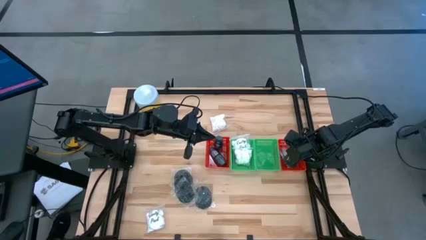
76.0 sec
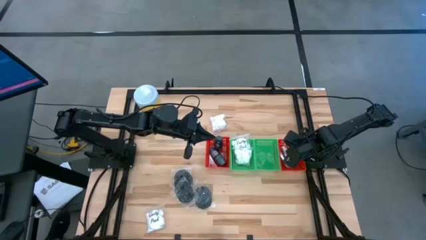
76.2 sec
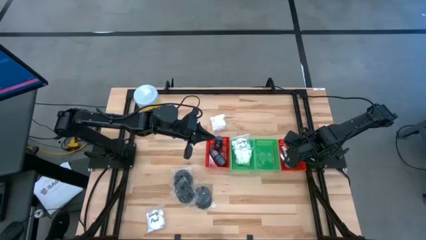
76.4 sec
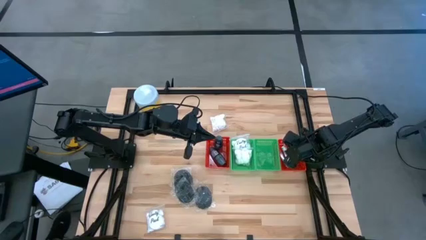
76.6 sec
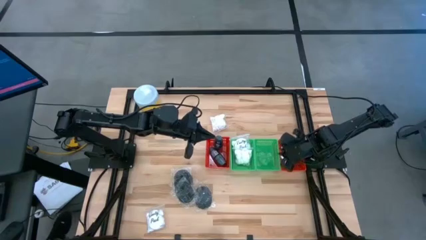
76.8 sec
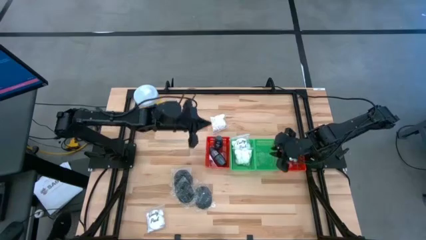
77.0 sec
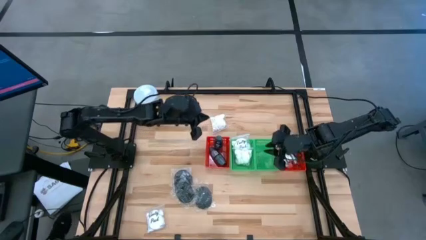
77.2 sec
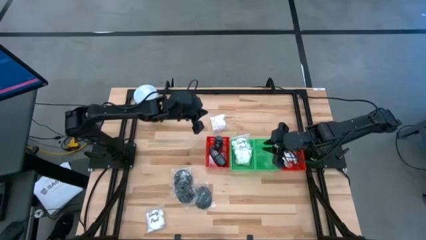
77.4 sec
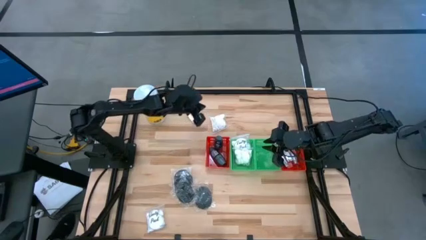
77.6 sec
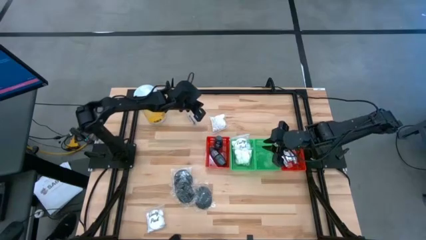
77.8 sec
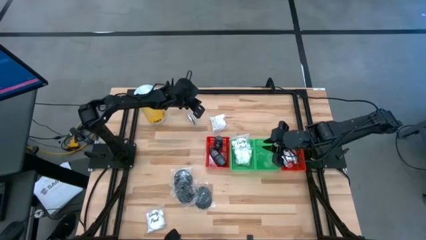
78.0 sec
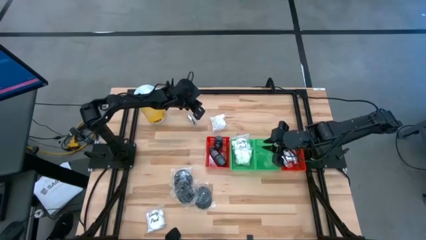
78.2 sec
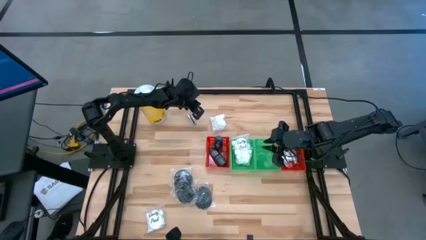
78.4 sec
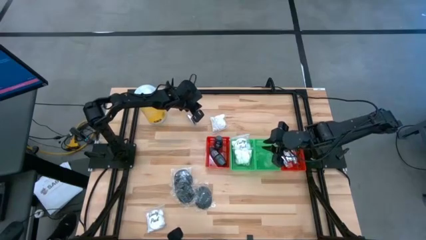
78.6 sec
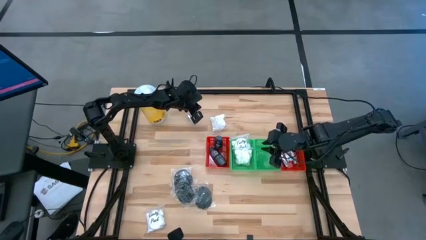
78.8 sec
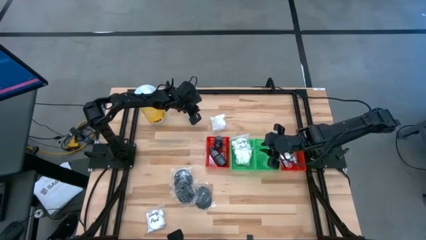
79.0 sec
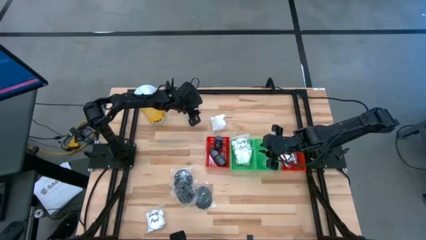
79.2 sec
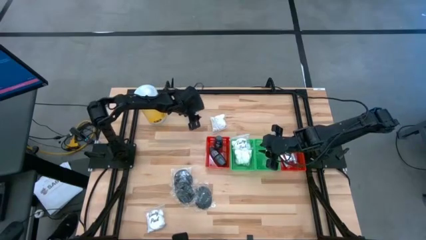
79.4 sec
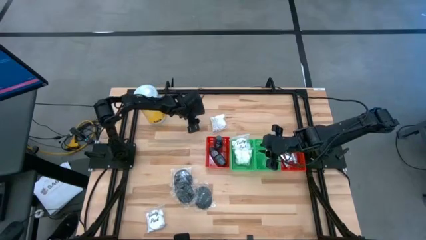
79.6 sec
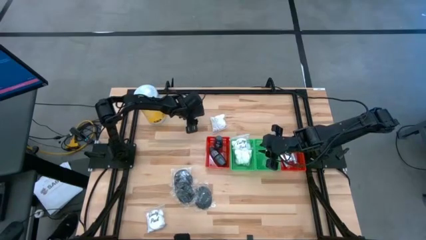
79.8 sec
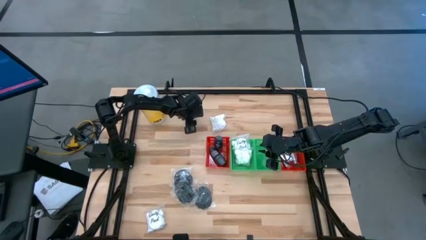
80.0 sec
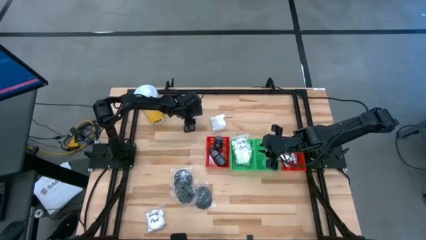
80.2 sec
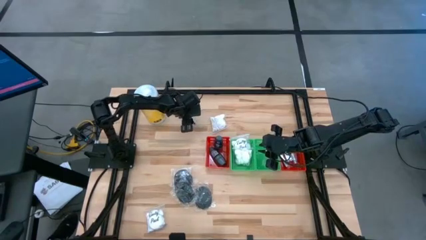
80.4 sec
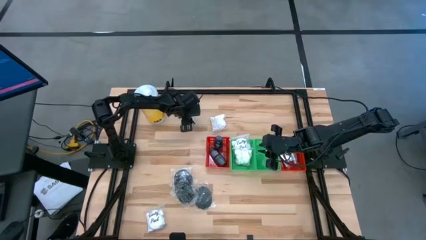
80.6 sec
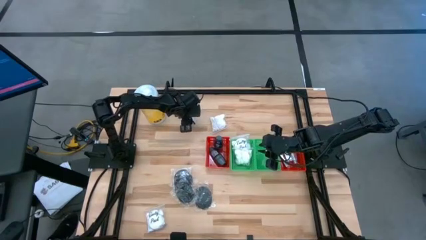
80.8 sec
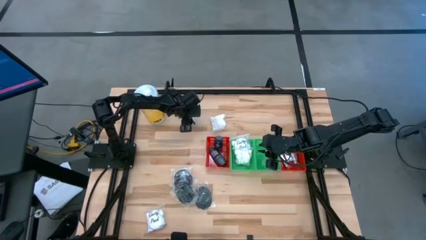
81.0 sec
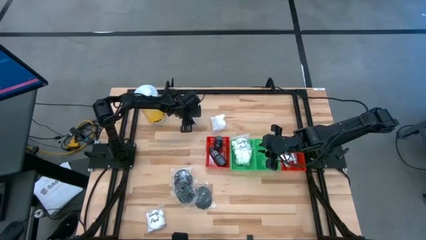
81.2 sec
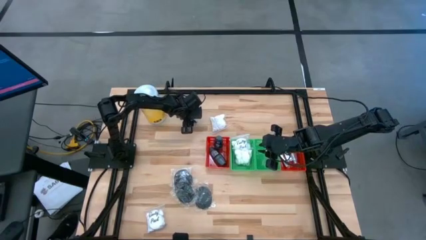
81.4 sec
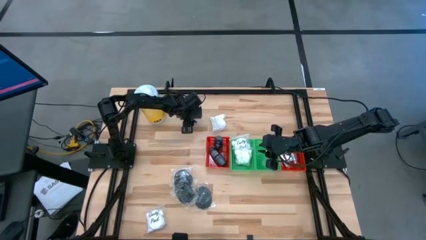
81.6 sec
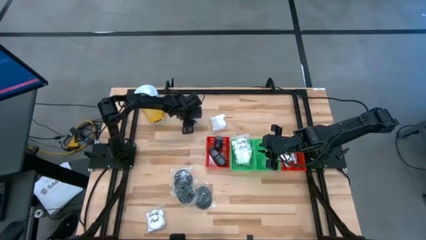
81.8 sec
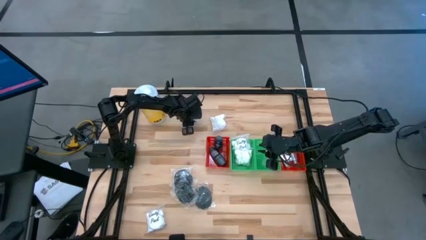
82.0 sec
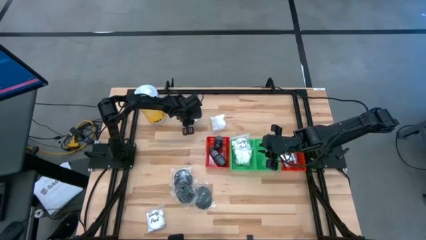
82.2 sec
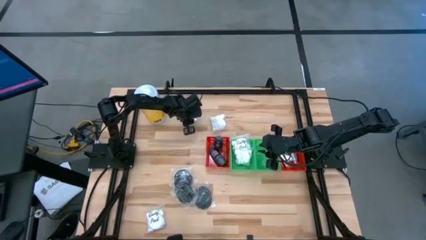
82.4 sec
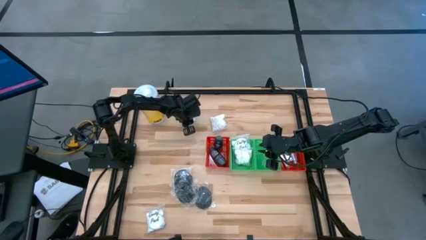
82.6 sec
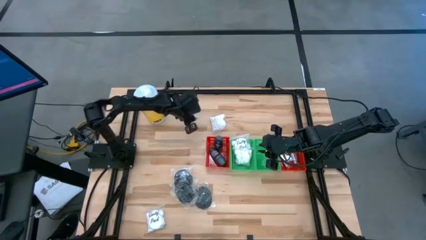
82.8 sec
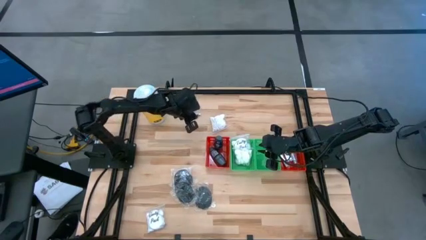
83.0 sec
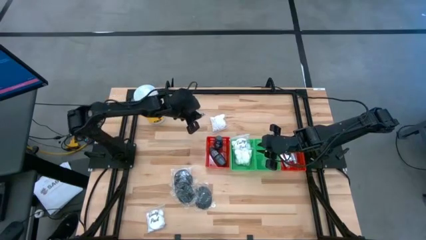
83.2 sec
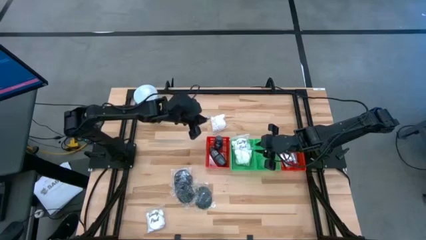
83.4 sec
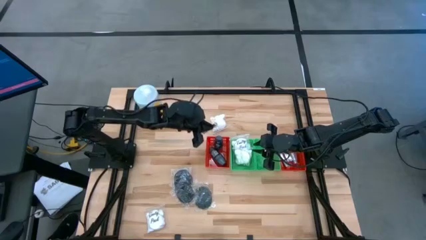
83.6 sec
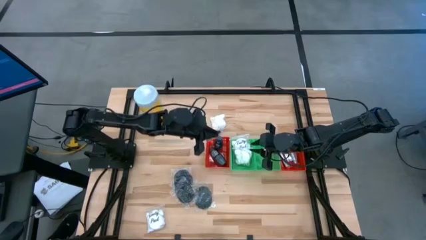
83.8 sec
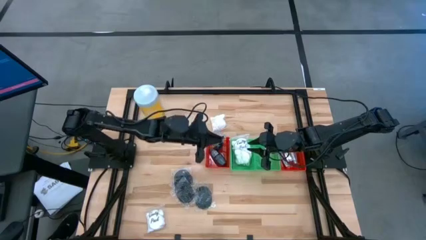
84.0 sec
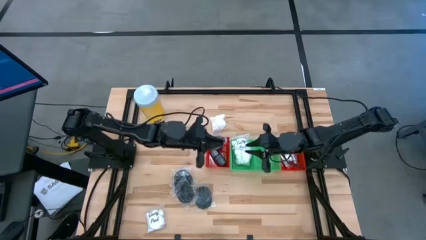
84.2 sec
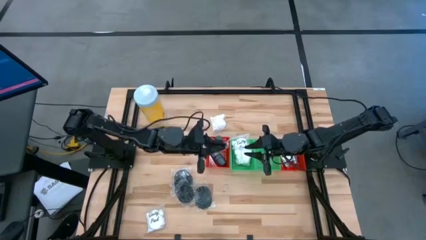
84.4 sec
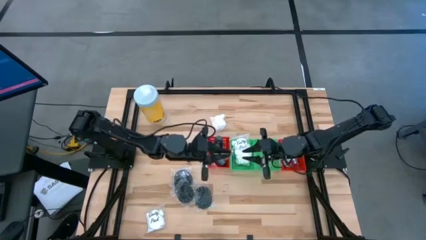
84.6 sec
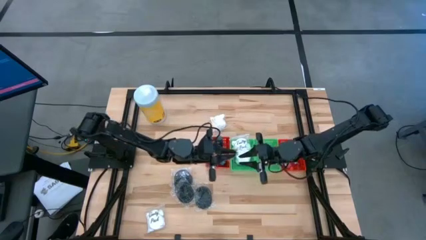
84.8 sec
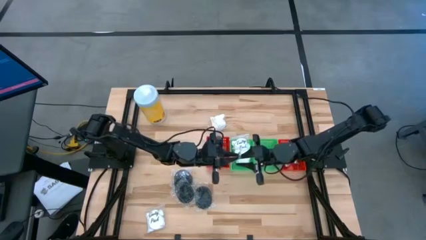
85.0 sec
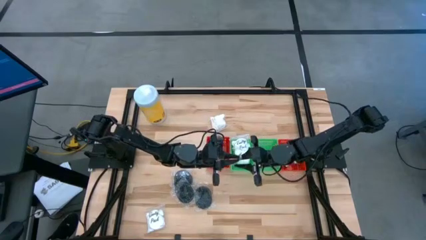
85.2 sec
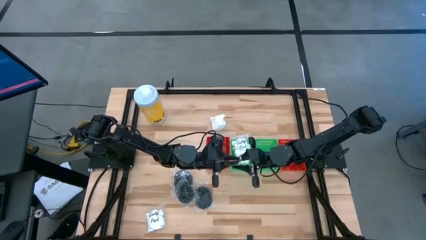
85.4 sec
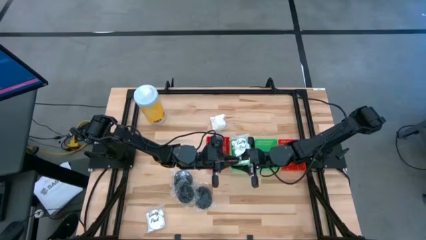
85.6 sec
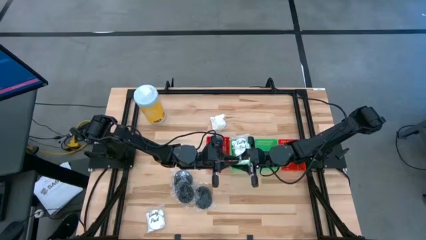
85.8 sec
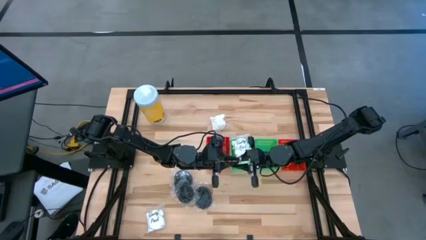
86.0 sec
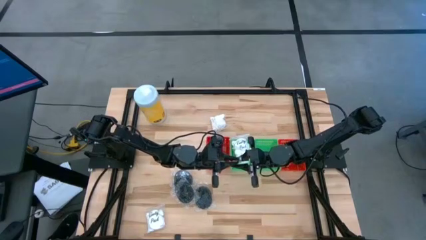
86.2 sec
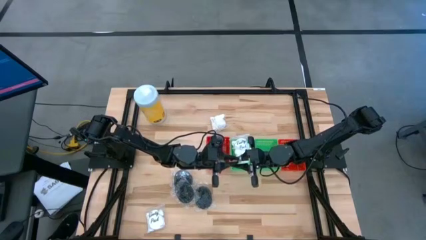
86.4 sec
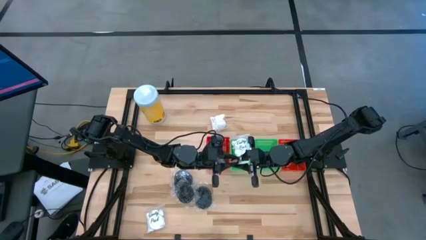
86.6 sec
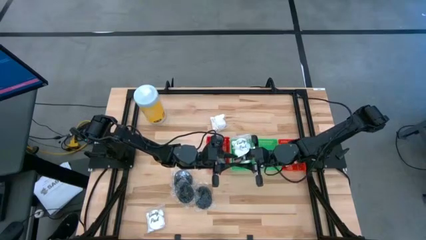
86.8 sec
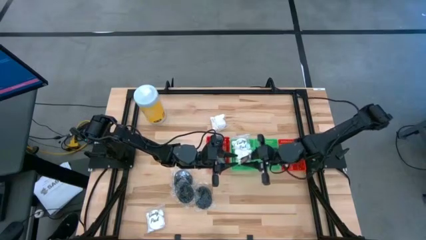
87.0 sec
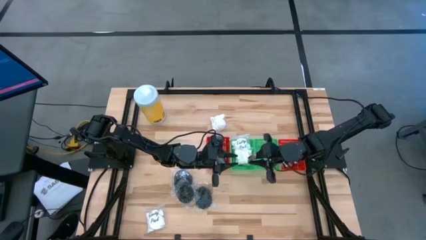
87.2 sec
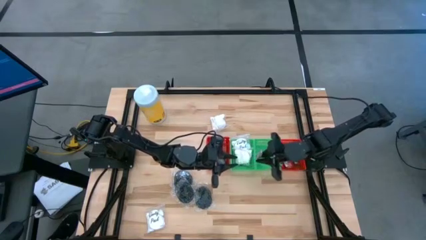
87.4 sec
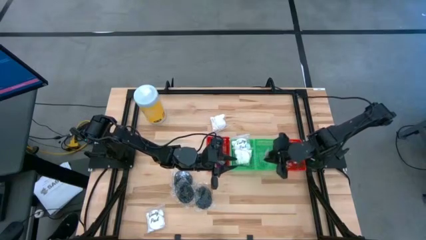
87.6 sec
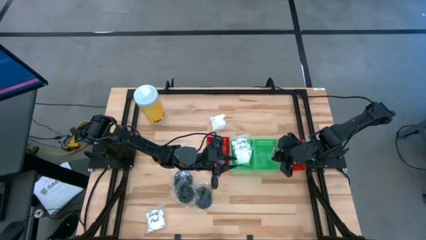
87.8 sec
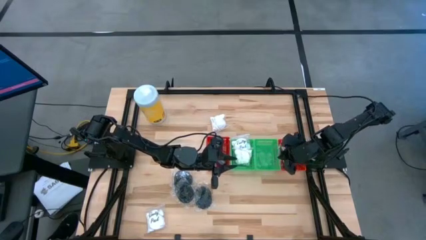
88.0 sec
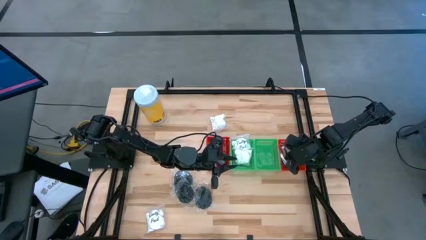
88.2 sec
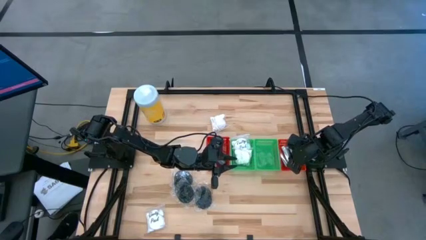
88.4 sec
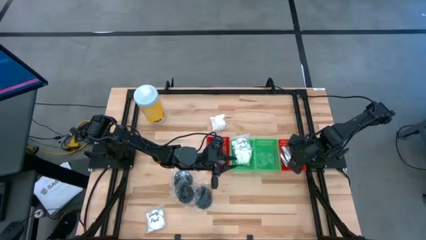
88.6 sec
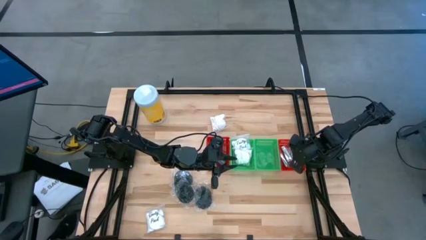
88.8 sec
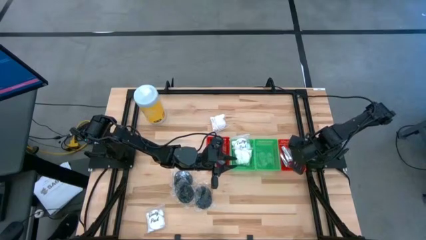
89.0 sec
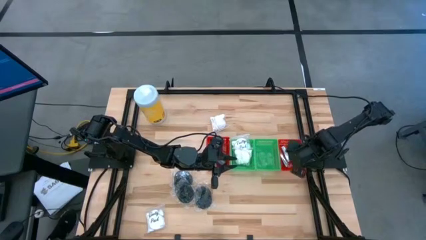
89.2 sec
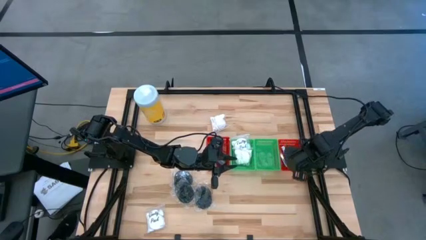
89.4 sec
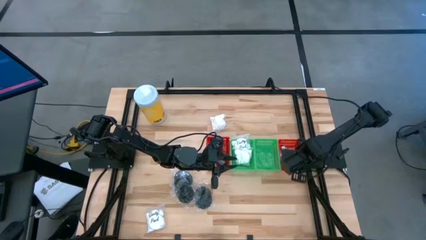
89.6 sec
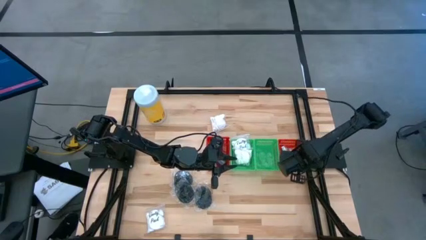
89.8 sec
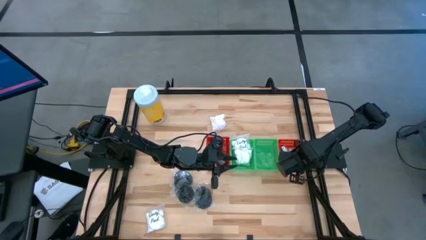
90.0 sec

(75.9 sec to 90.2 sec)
Task: Pick & Place Travel size toiletries
Put the silver nail cutter into the right red bin
